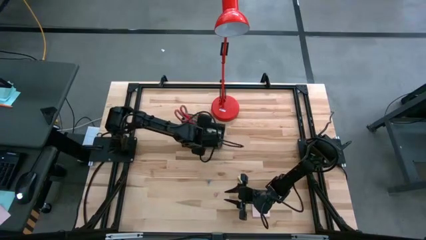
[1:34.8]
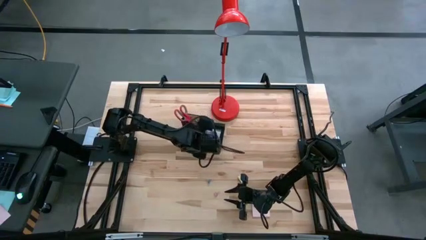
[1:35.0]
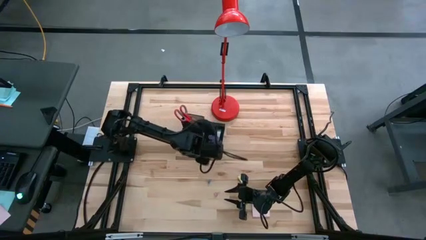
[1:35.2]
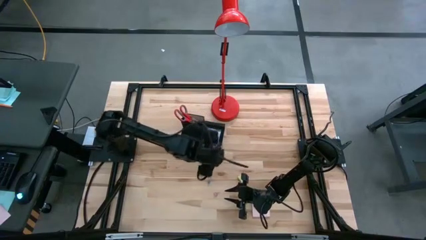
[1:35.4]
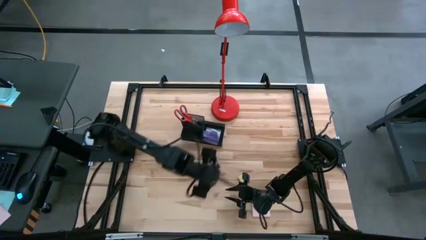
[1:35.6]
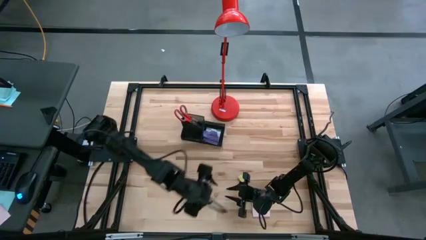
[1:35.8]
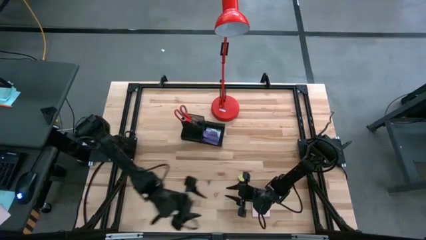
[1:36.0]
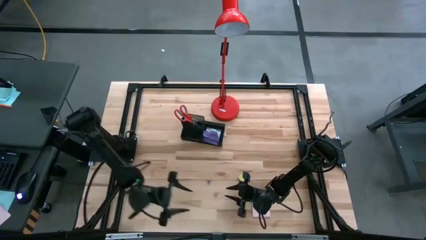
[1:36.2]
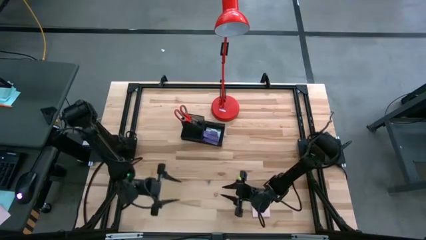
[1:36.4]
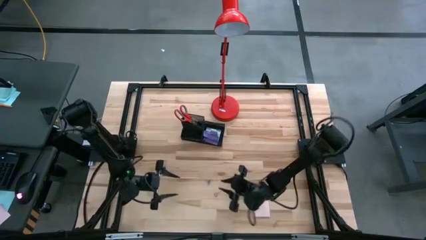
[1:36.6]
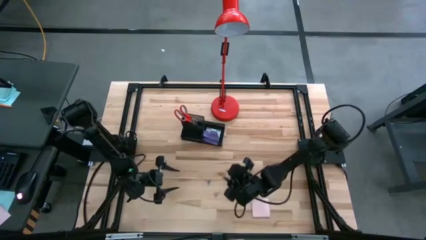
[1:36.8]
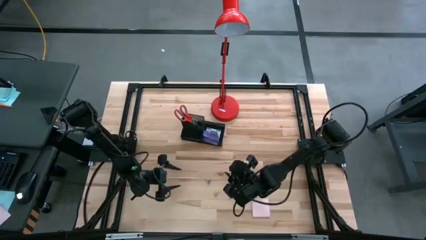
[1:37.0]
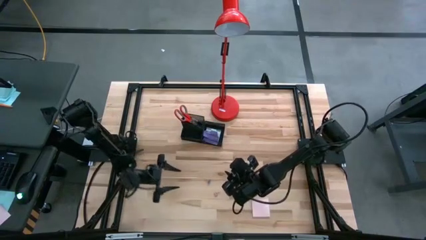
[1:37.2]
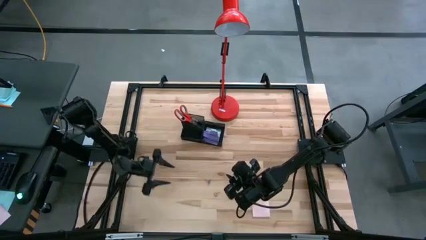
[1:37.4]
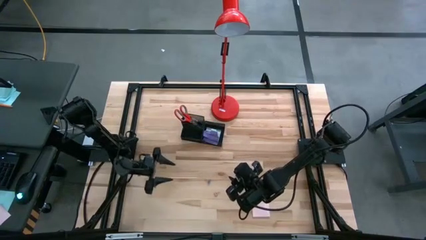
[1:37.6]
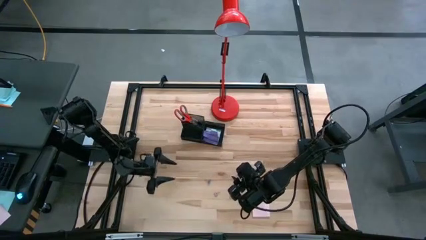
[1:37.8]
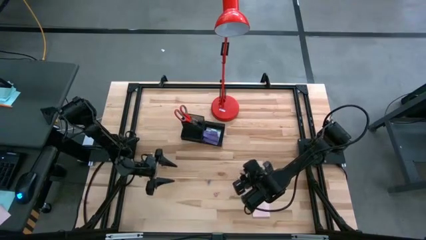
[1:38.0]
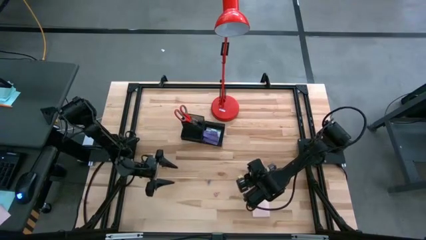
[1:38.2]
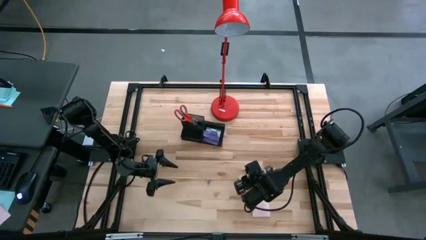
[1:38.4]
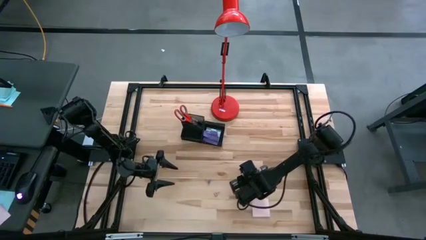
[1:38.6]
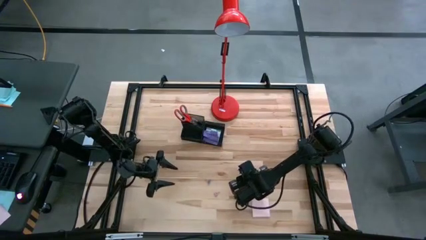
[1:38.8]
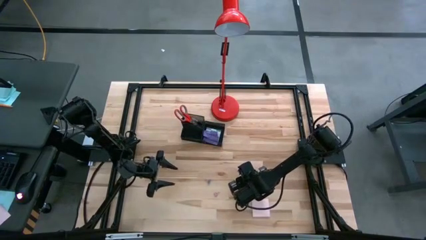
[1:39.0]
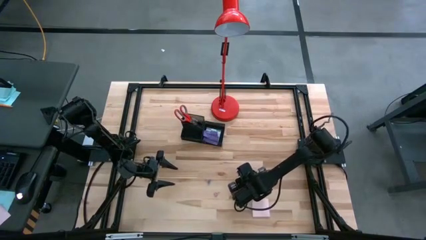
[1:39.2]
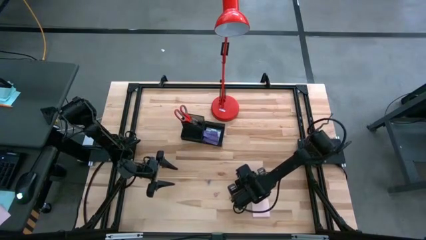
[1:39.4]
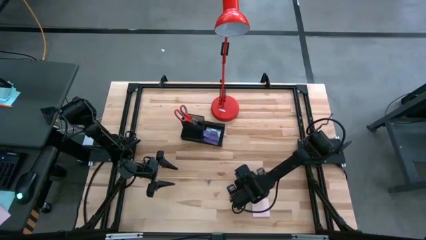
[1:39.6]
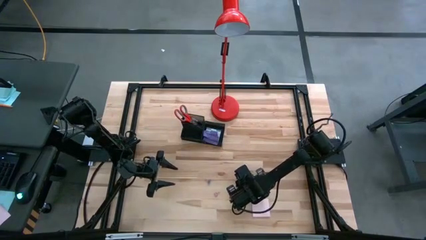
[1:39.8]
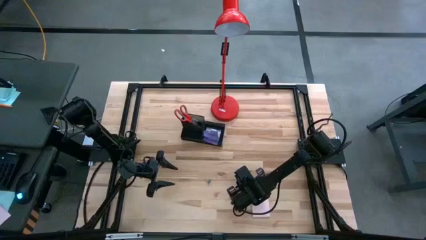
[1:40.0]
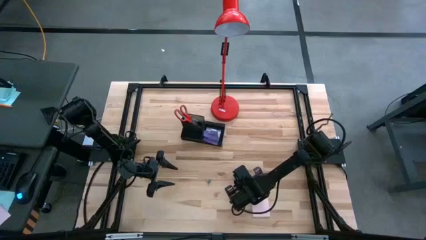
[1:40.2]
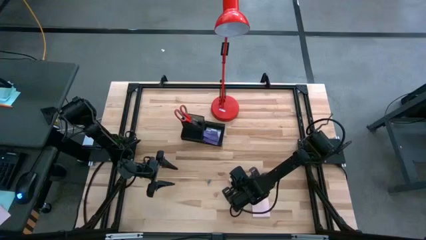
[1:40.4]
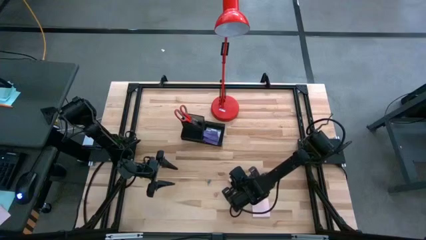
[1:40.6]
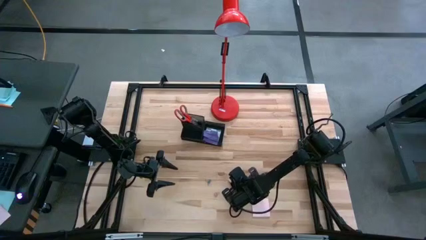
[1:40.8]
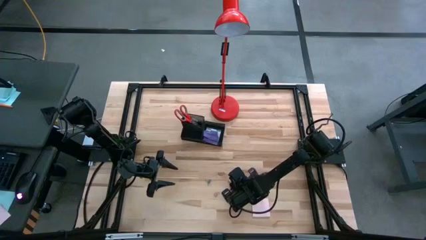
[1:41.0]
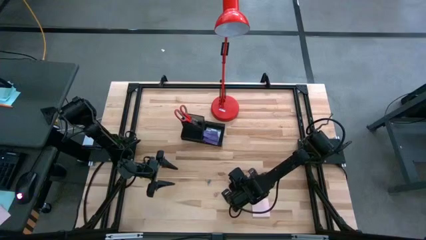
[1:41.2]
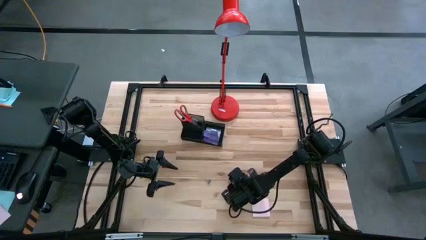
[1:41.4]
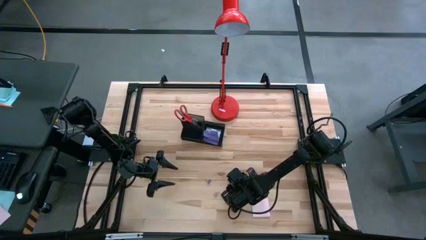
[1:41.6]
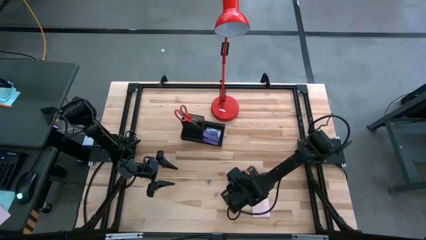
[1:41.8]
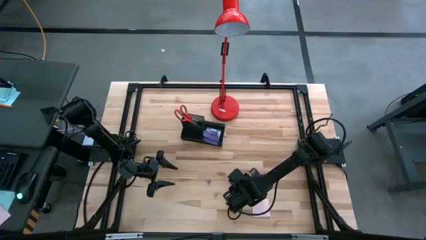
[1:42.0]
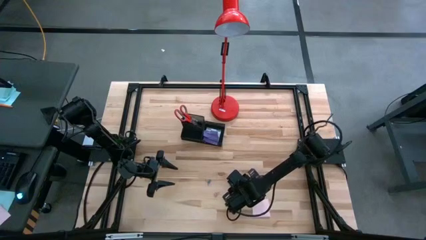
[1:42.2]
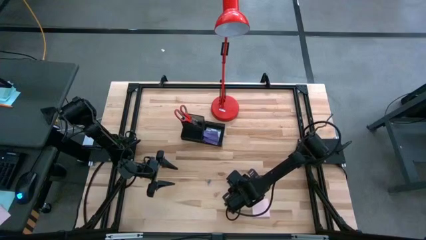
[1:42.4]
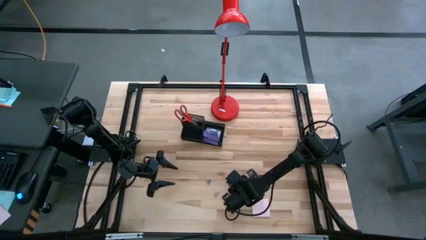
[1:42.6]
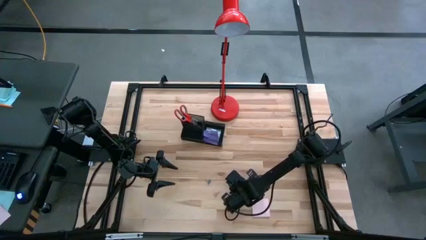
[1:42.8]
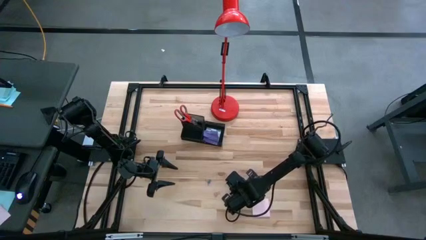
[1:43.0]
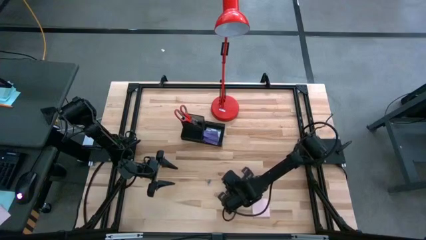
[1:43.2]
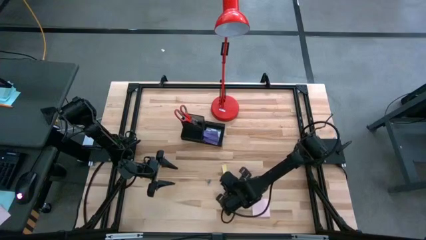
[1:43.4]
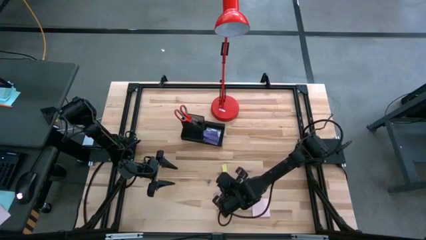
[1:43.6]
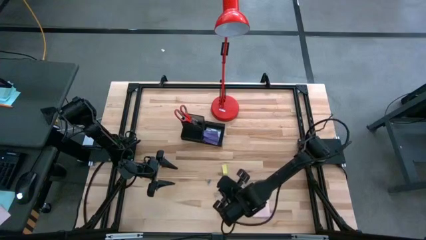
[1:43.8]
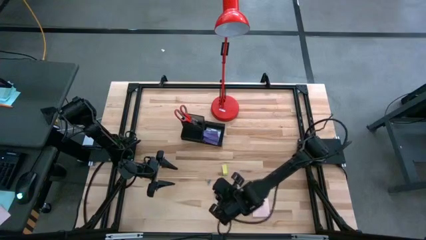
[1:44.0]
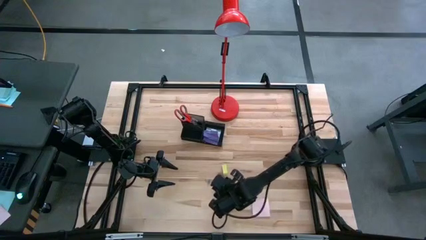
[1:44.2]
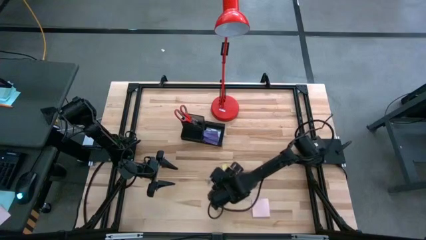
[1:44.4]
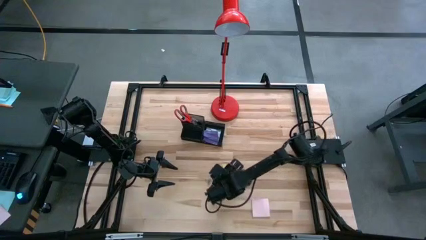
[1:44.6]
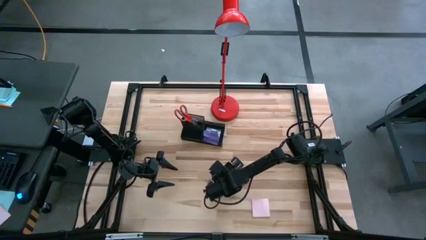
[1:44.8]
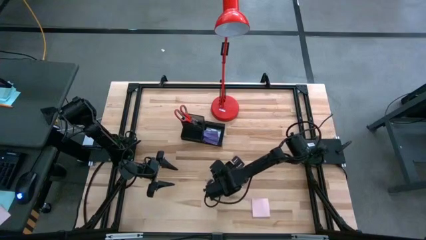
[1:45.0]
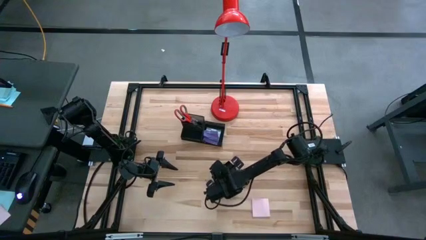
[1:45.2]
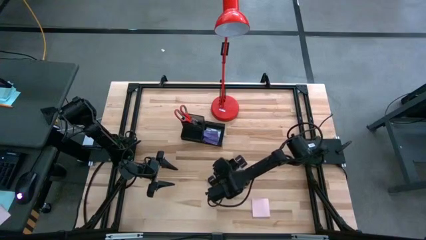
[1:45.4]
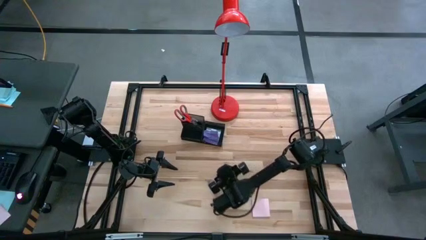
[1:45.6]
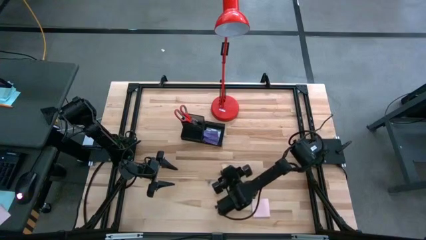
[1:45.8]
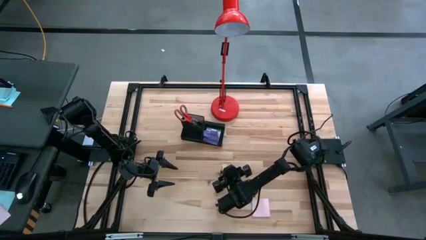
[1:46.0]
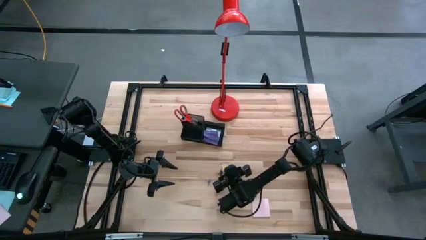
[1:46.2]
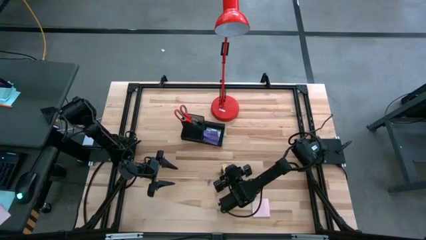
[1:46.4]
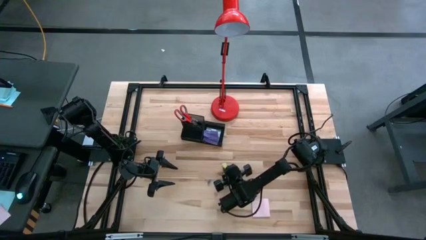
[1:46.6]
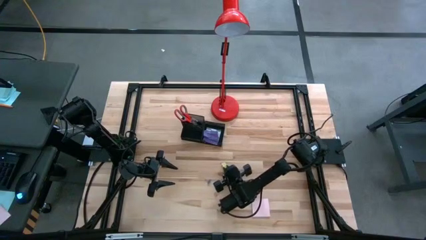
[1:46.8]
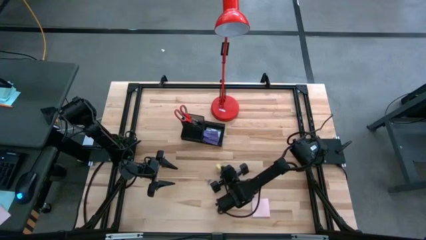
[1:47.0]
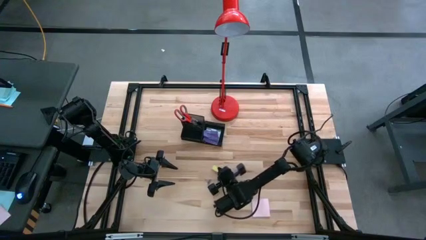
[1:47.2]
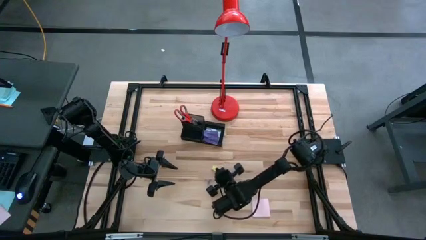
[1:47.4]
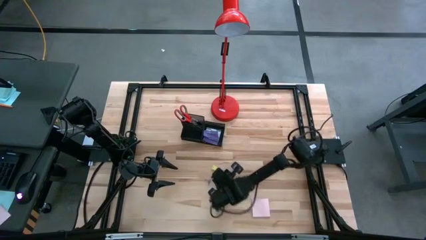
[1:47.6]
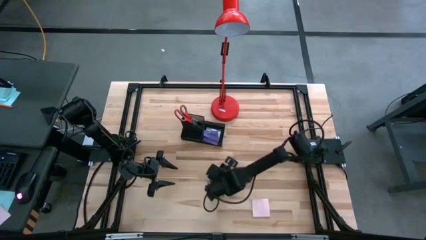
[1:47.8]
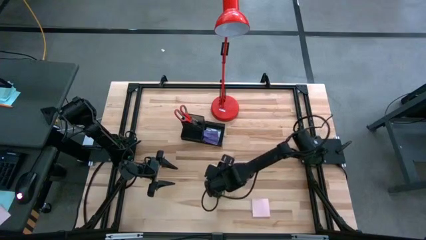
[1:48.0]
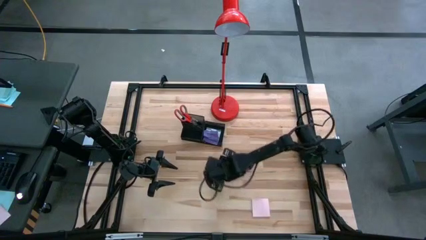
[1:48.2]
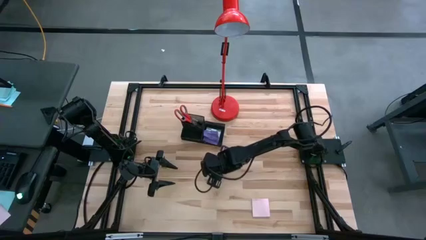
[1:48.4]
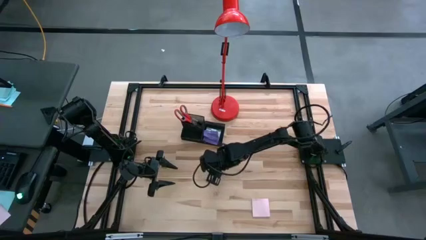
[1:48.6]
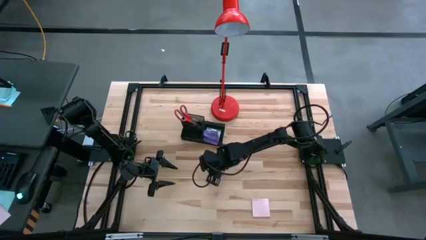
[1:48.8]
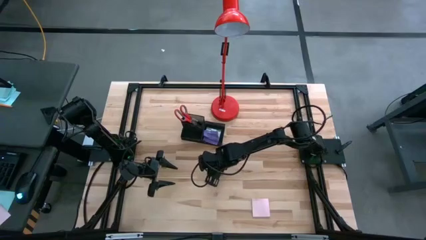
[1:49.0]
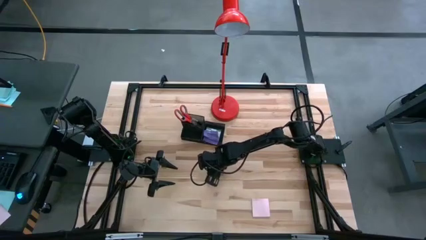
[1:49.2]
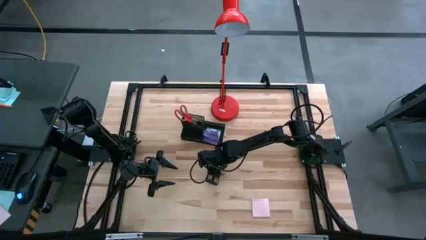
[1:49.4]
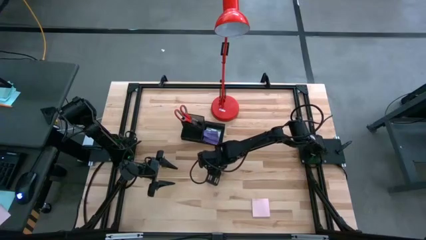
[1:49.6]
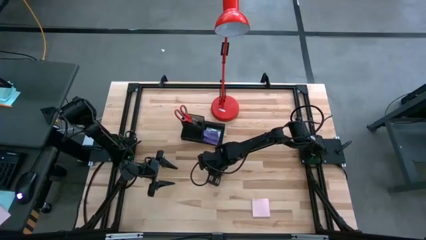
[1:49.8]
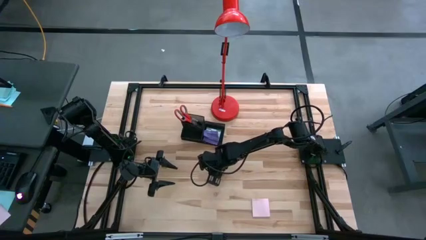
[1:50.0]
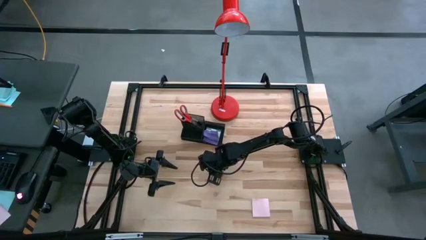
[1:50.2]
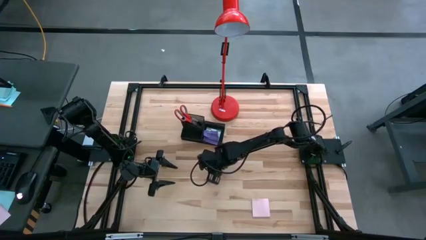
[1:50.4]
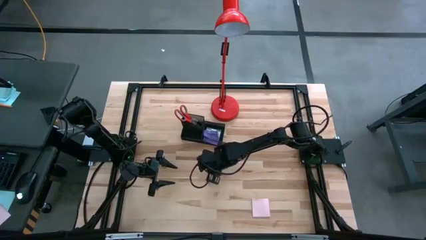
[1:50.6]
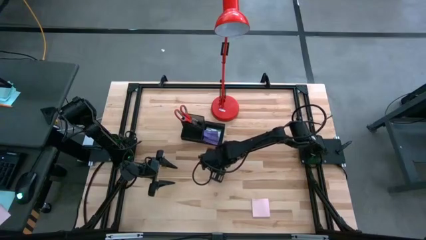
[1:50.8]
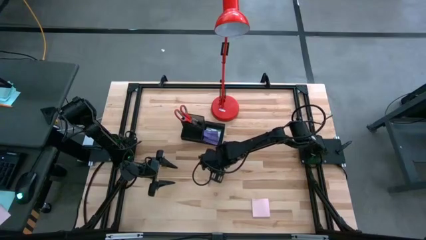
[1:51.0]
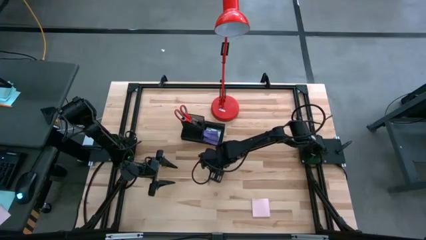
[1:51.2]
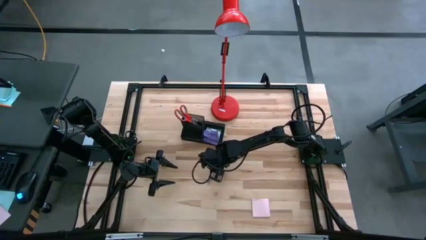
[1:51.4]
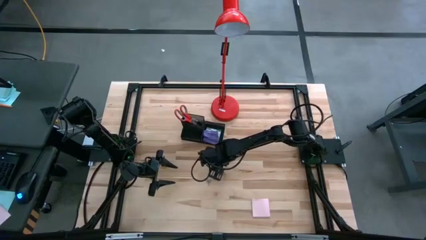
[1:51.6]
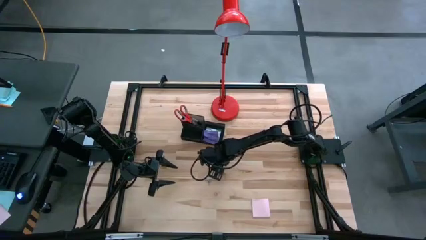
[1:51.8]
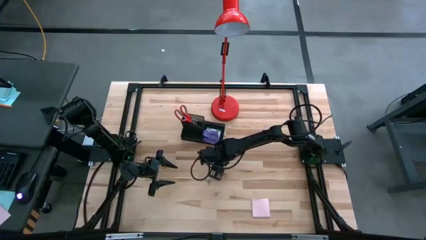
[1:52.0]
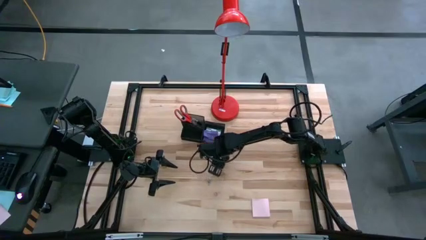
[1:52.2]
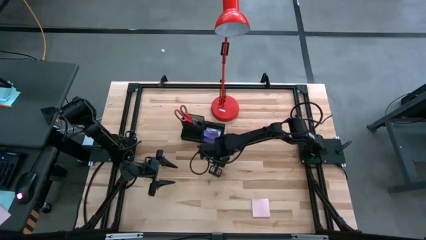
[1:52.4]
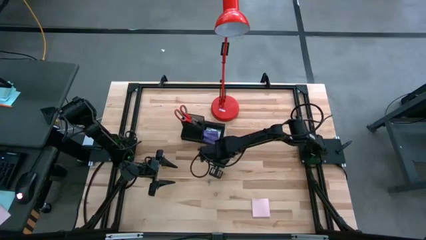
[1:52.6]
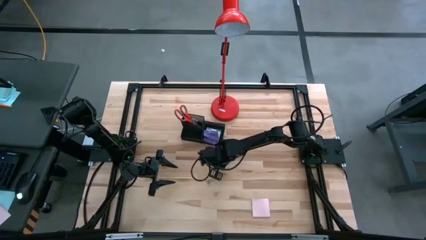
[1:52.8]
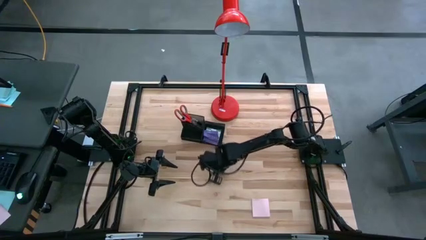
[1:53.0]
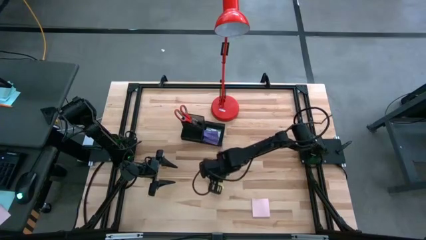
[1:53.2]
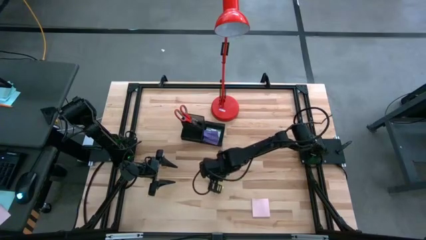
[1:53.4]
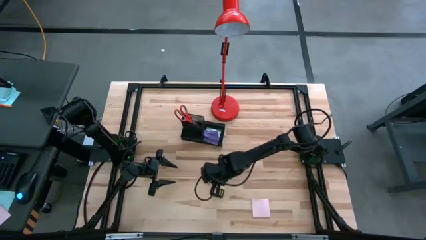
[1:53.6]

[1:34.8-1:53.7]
Task: Pick and place office supplies into organizer
Put the yellow eraser into the desk organizer
